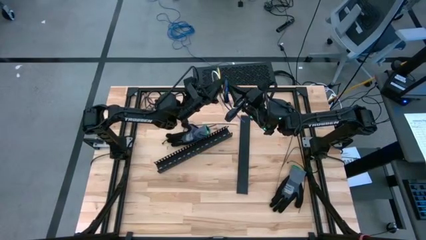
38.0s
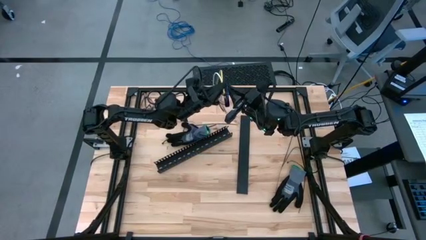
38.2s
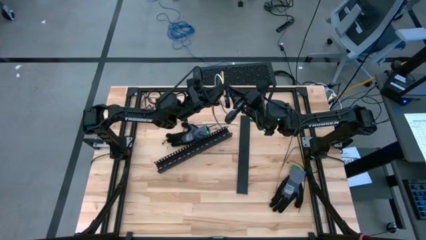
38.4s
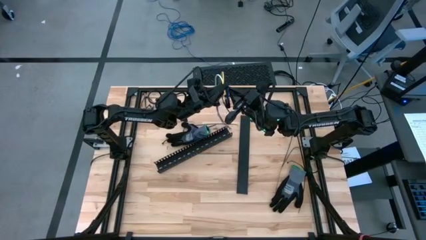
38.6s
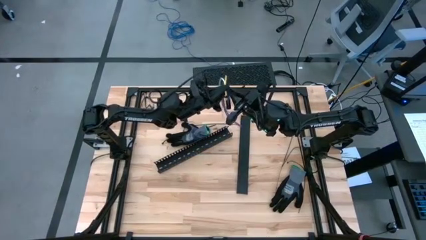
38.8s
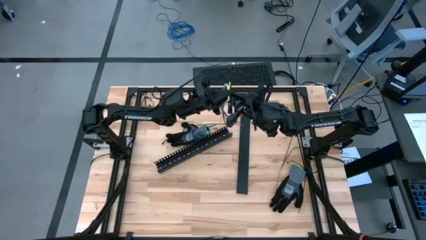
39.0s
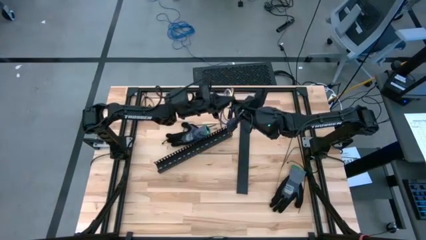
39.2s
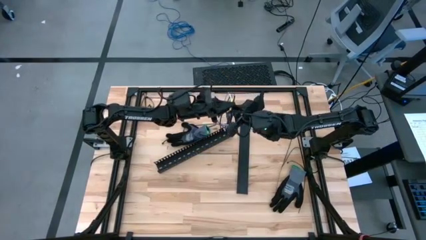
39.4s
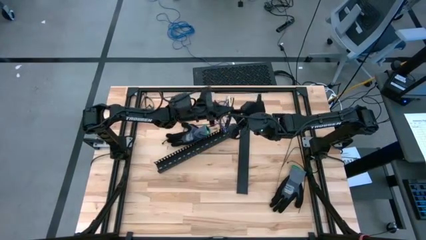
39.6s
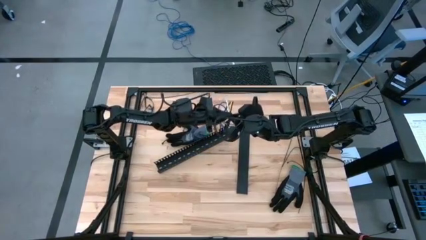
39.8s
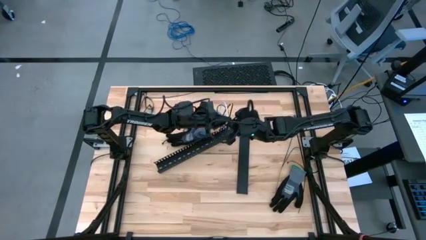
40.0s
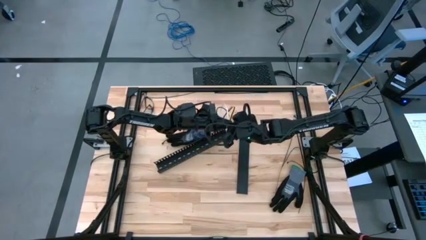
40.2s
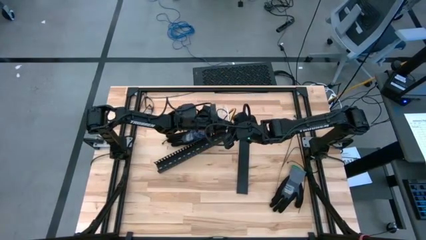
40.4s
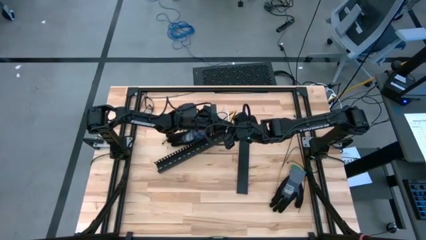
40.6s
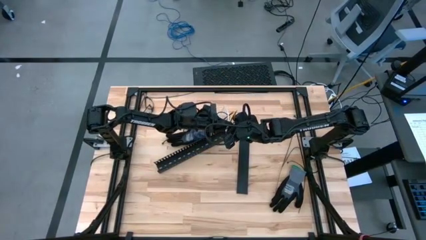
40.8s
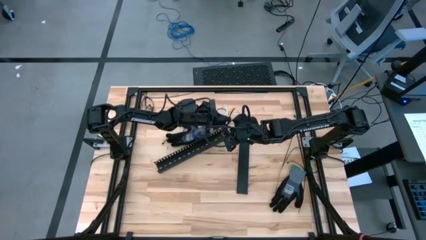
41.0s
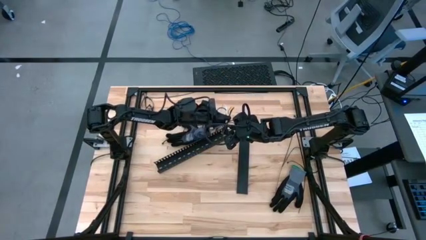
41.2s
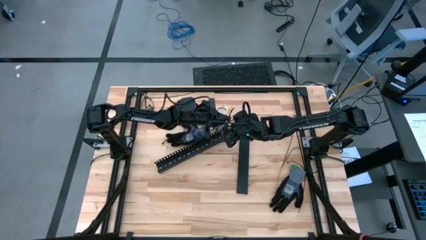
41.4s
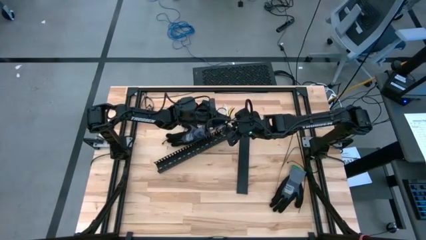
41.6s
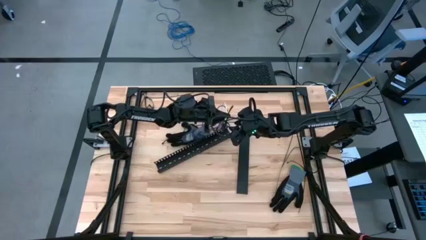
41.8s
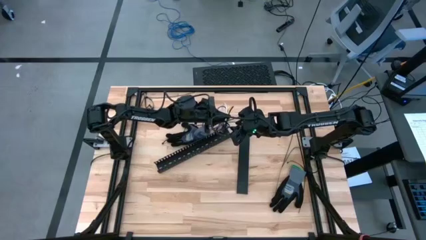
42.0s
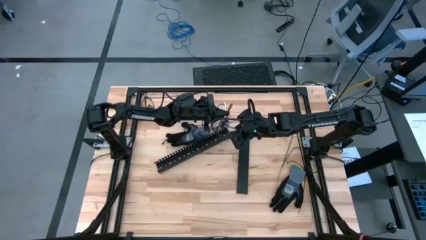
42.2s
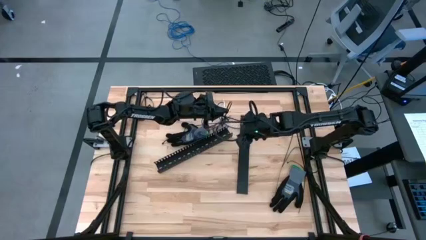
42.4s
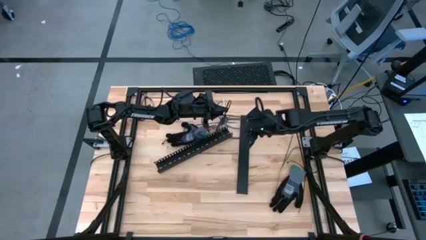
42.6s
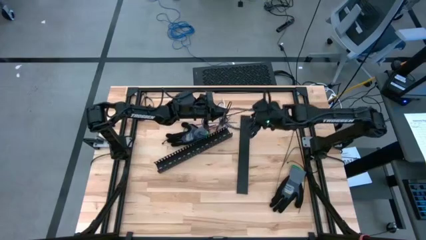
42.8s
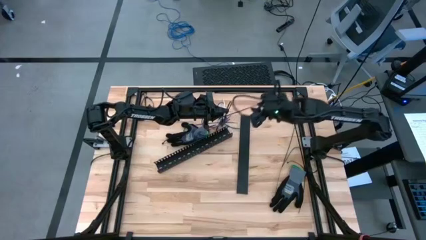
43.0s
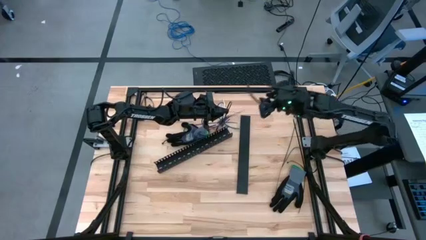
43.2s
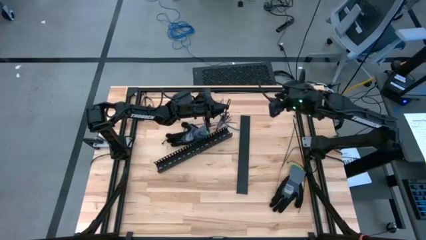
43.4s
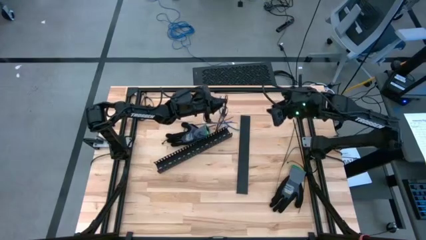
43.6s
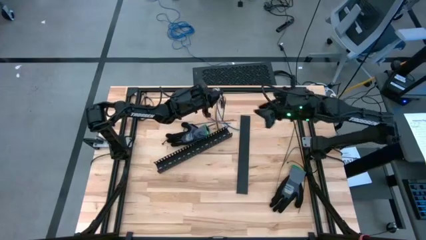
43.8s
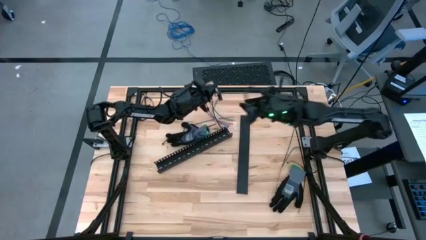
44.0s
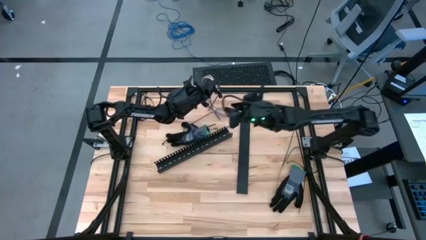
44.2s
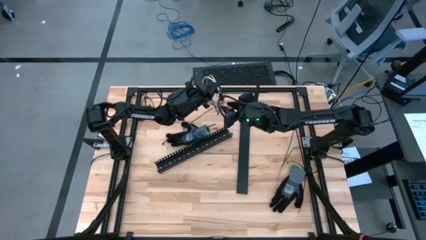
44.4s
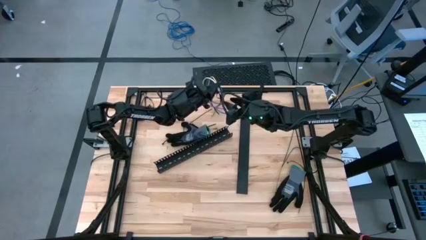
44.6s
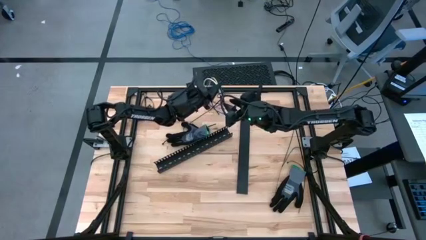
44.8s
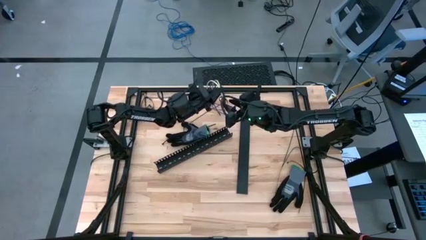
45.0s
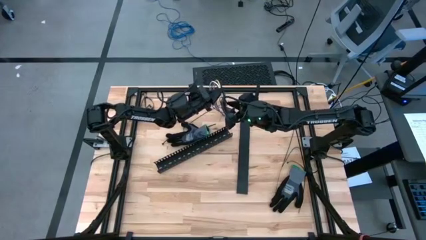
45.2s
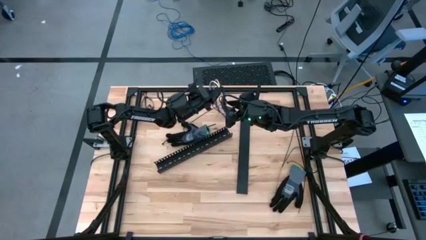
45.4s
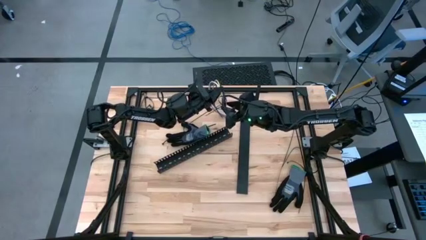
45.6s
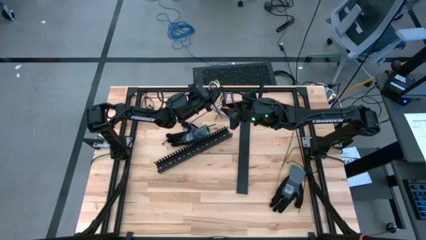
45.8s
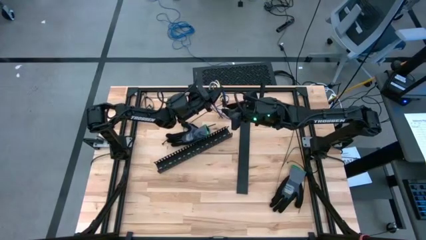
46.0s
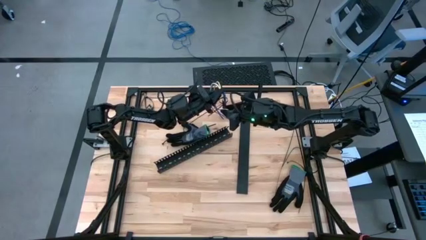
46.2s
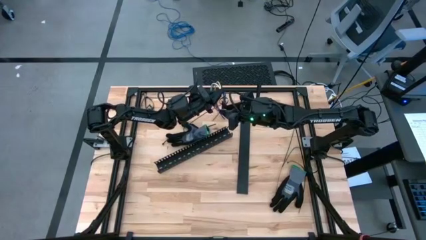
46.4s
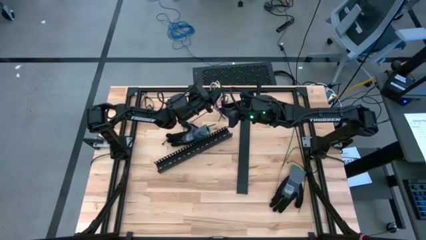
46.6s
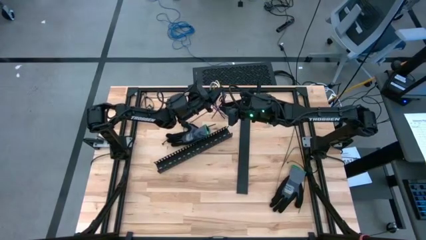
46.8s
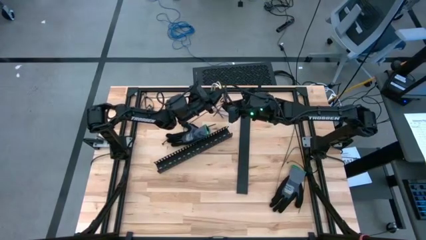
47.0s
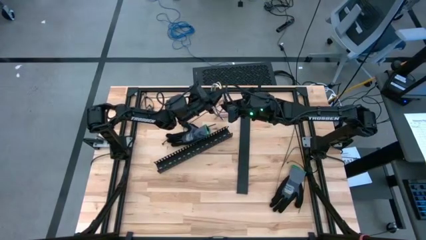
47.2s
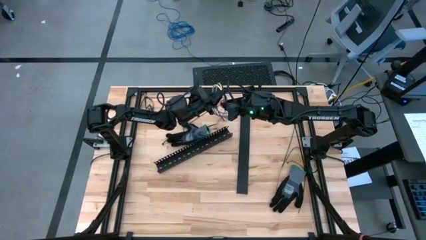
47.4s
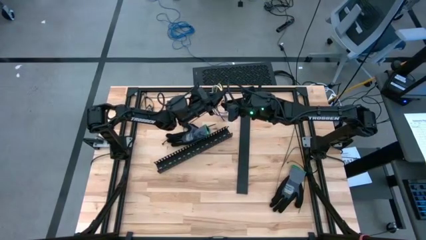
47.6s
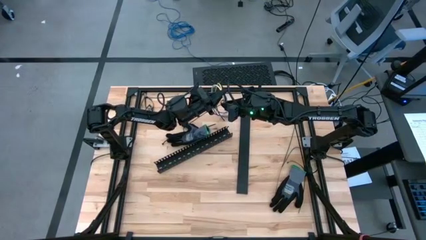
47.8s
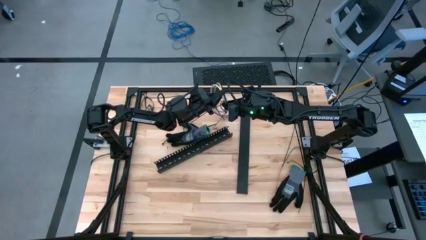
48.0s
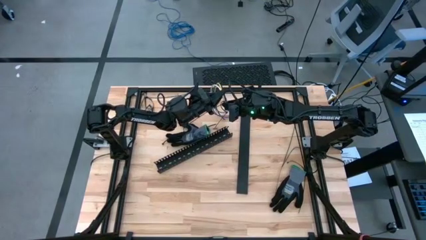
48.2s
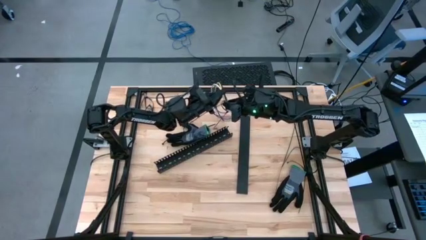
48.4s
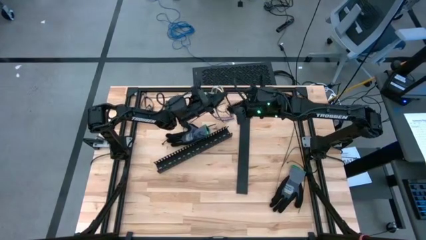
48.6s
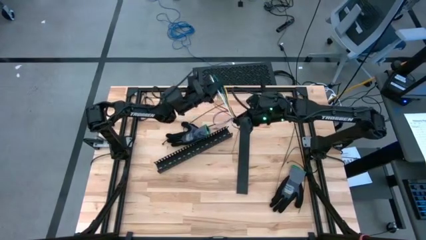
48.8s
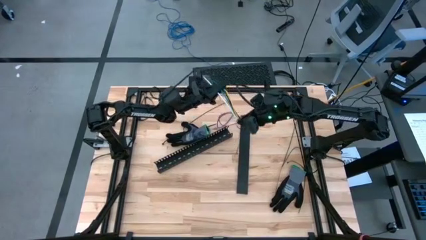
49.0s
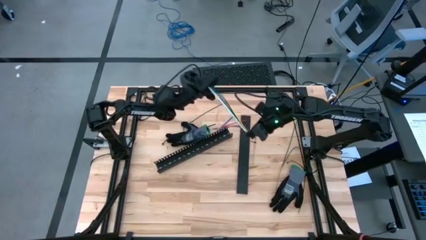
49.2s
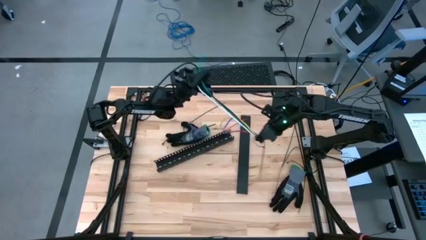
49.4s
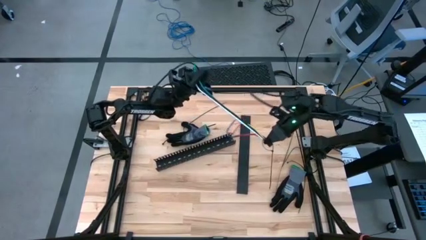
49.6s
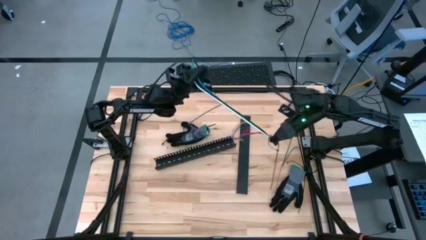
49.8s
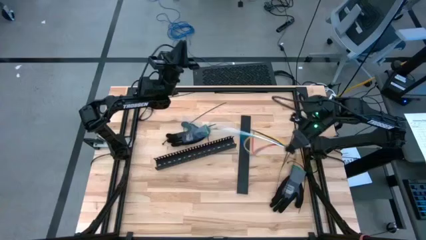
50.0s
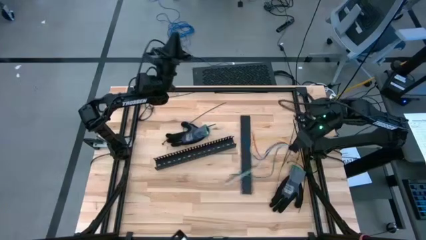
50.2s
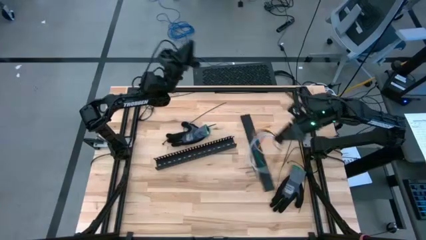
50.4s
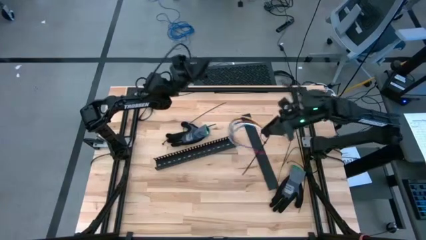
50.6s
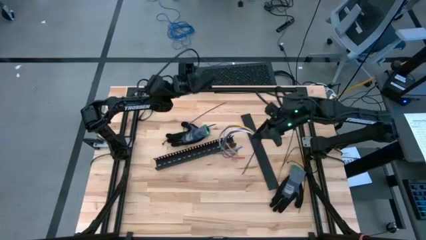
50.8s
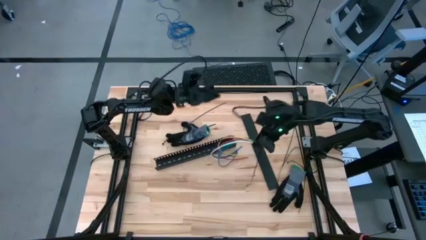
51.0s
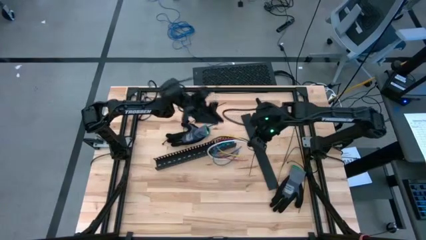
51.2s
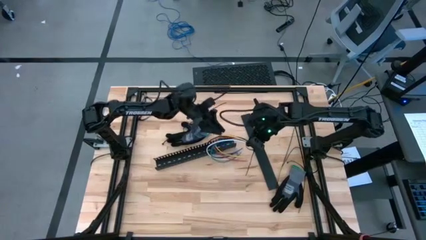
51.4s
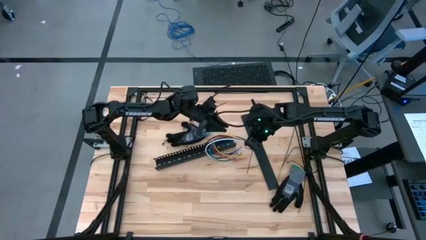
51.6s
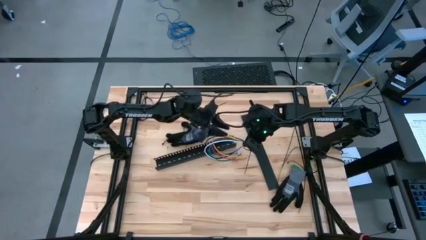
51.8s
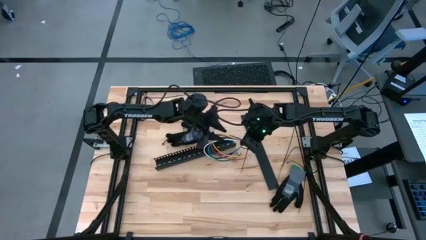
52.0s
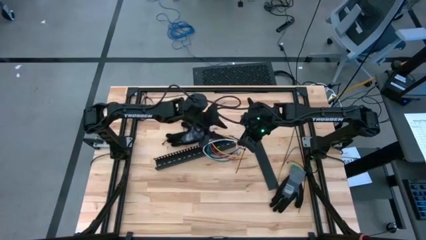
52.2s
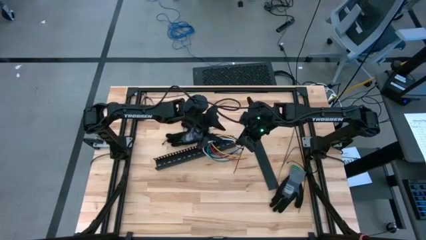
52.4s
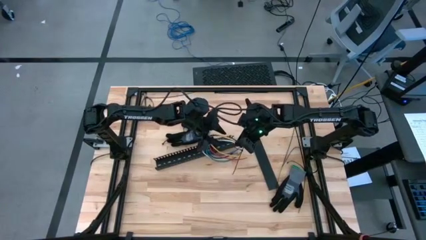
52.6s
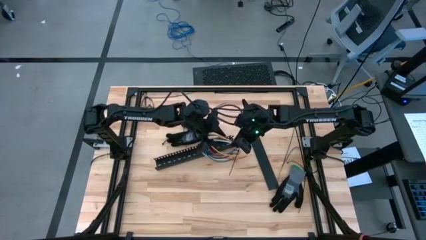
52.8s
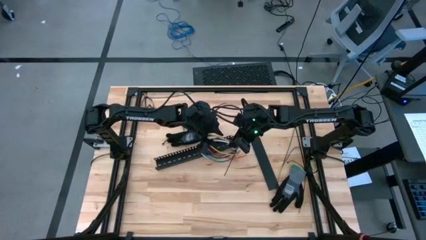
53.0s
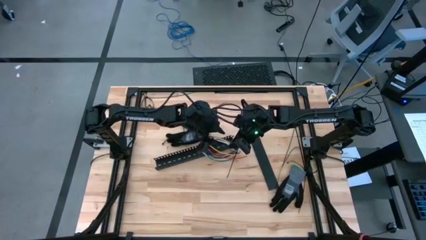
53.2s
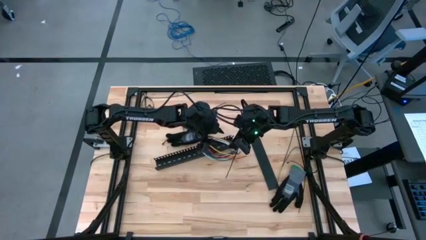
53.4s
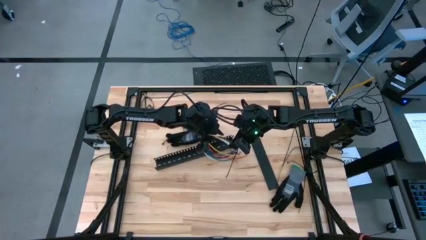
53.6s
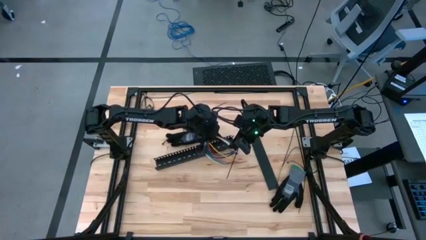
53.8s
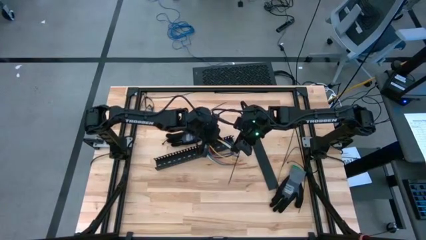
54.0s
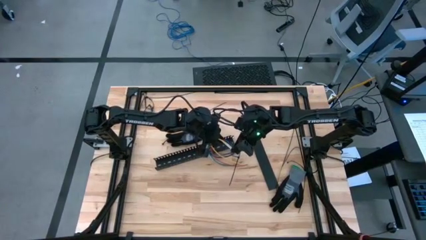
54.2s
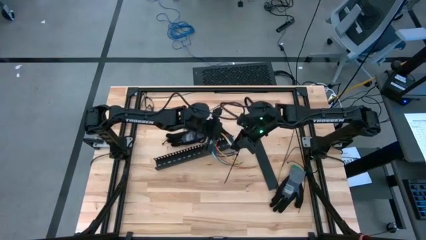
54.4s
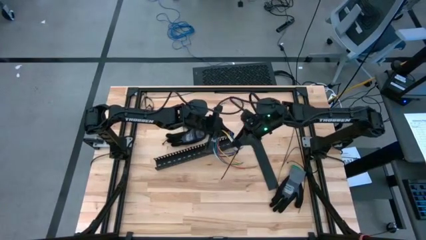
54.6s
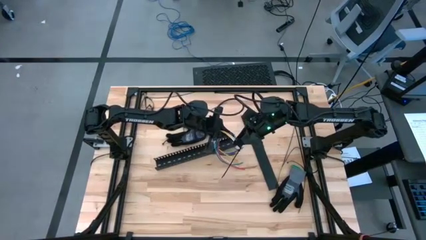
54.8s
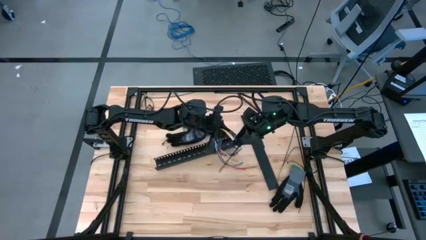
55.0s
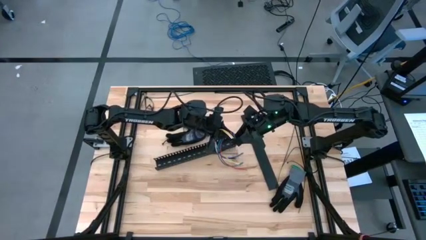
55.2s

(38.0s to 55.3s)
Task: Ziptie cables
Wrap the cable wires with black zip tie
